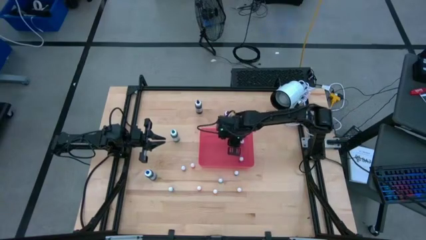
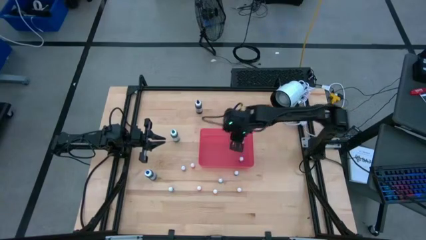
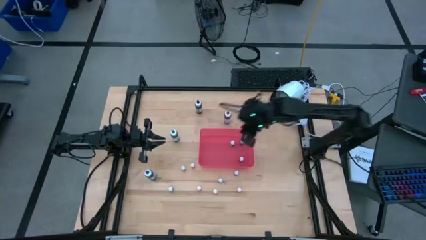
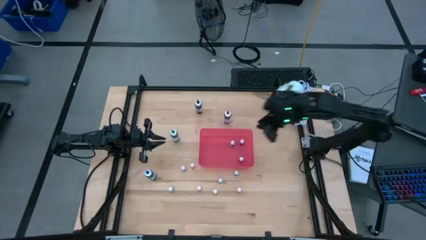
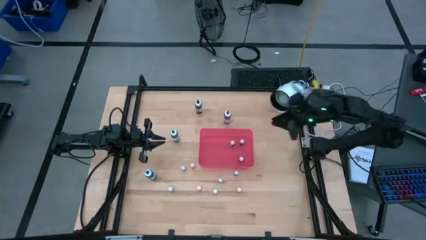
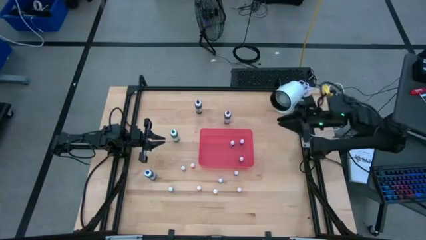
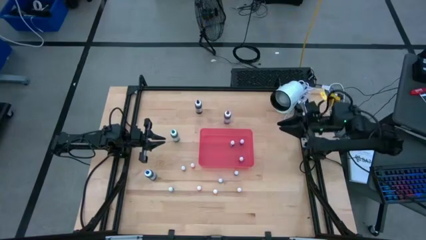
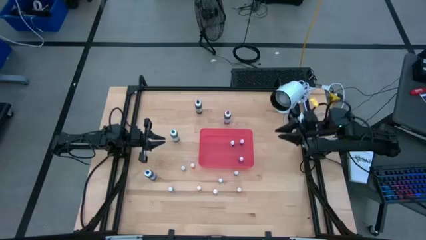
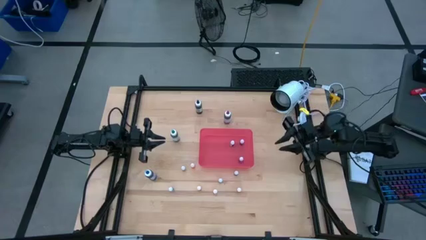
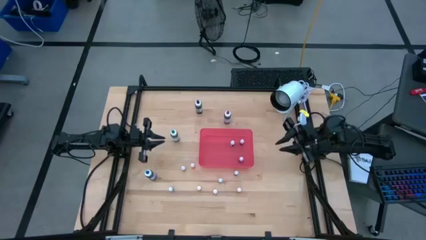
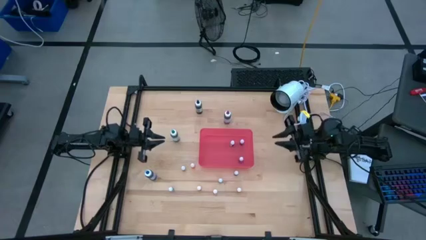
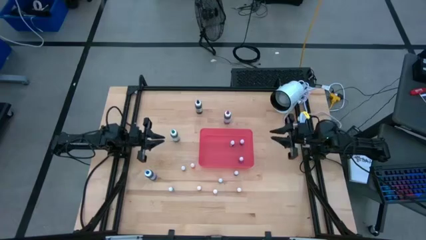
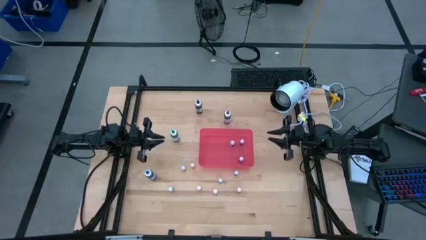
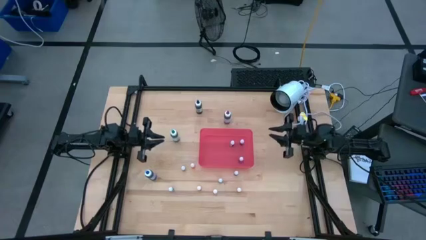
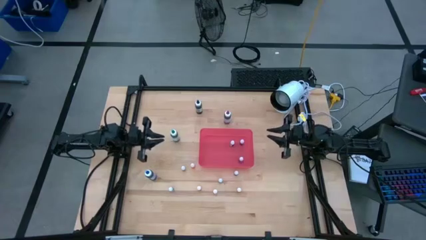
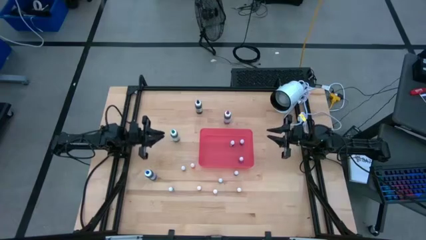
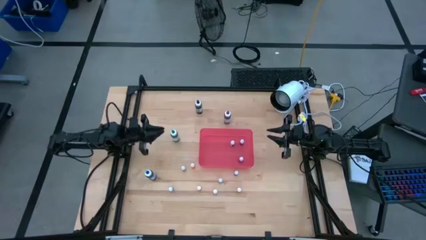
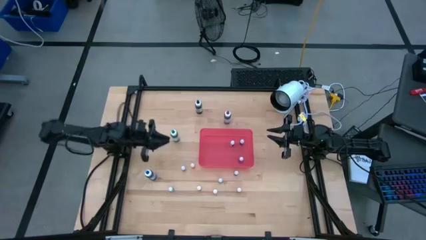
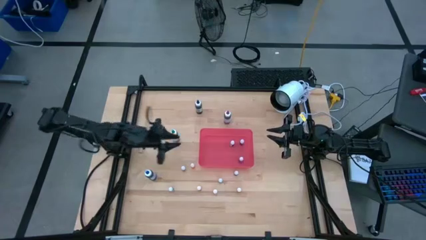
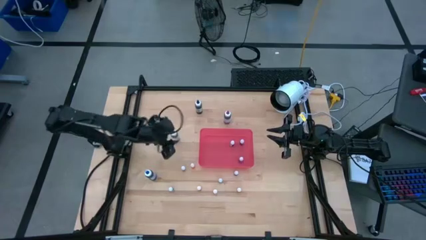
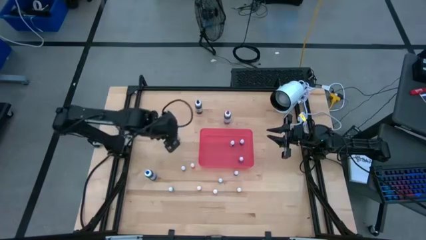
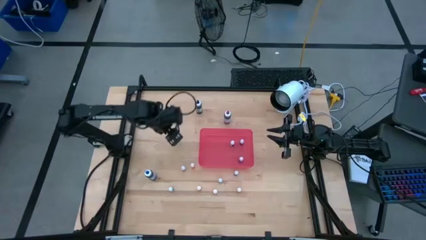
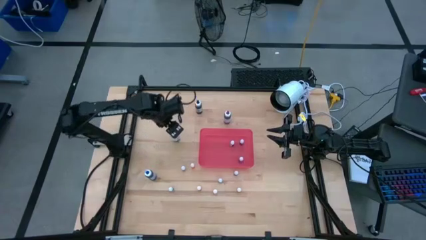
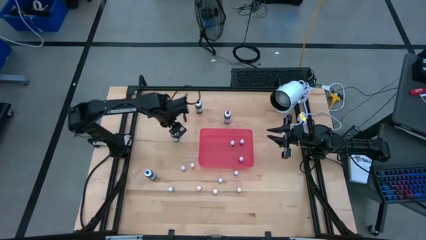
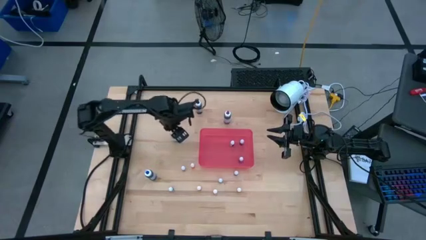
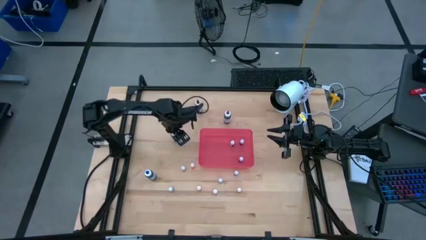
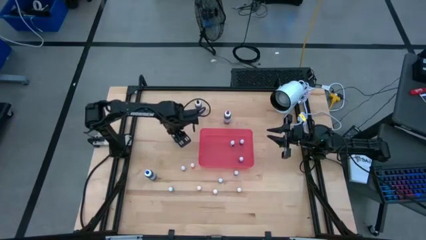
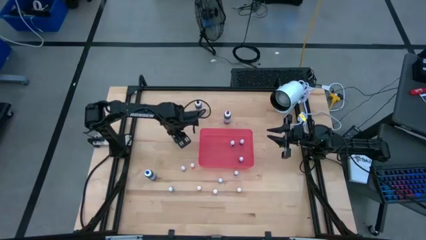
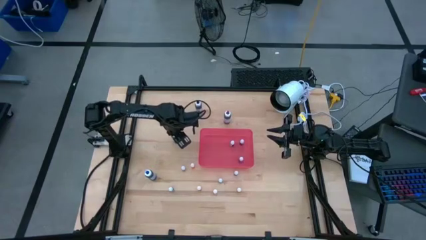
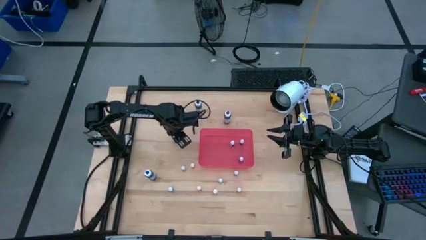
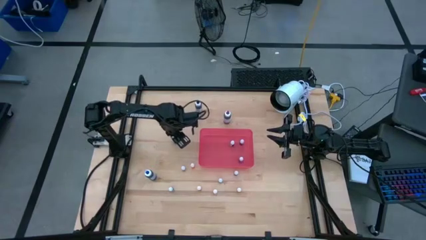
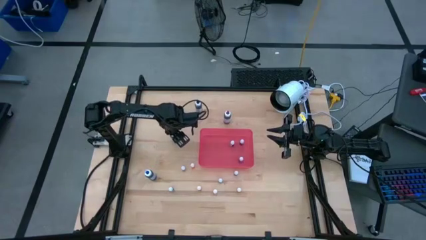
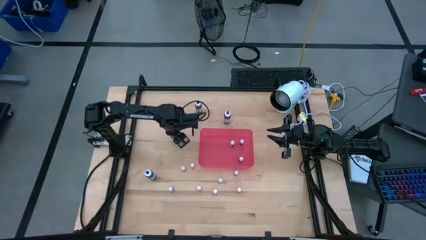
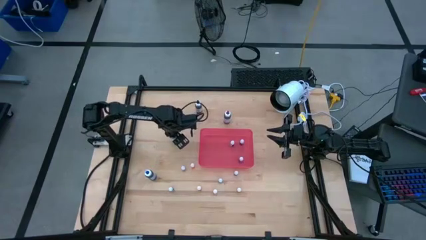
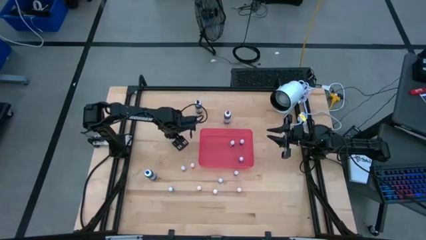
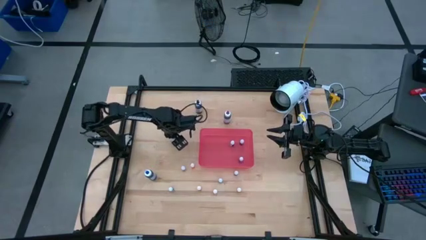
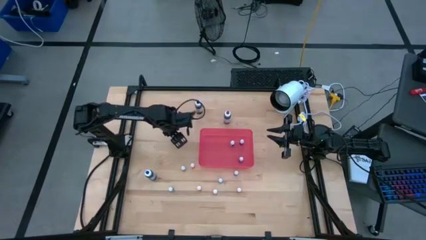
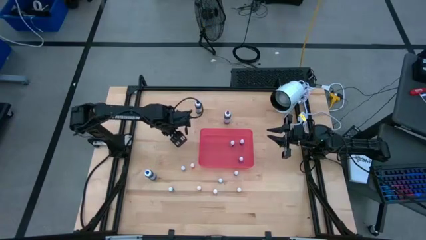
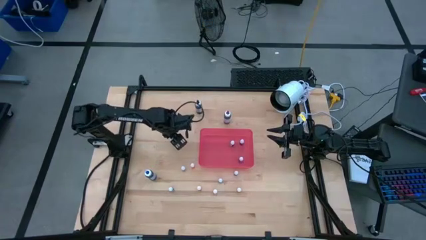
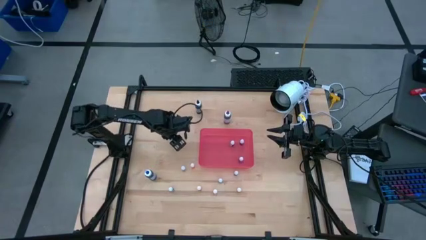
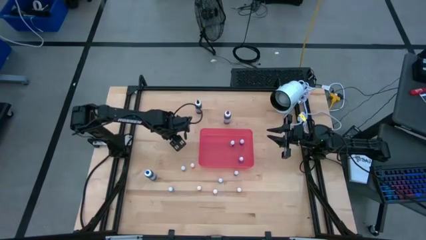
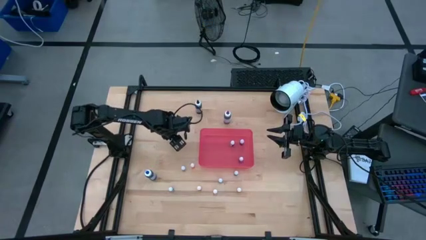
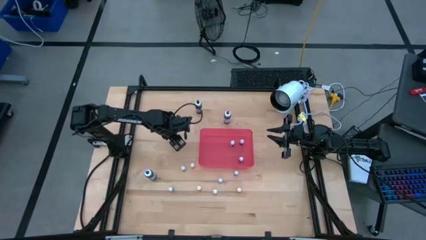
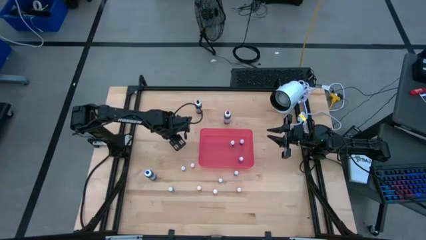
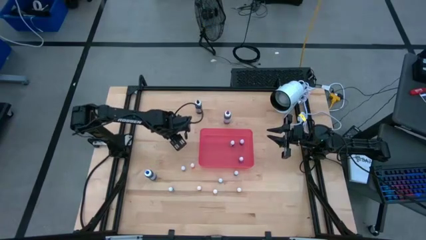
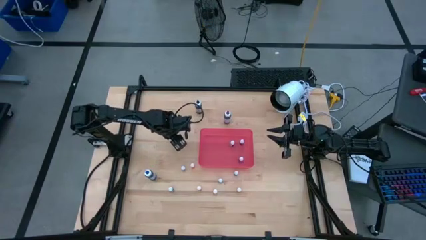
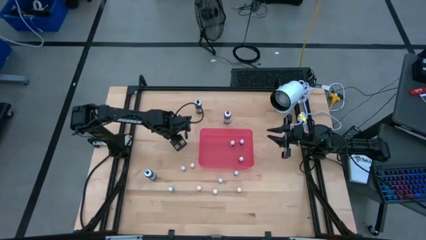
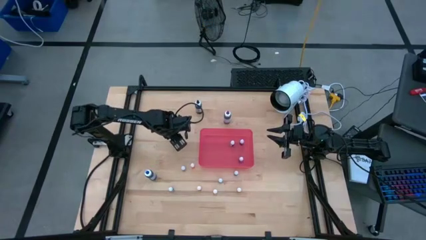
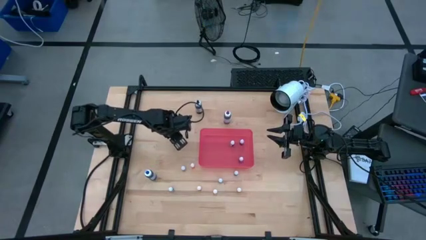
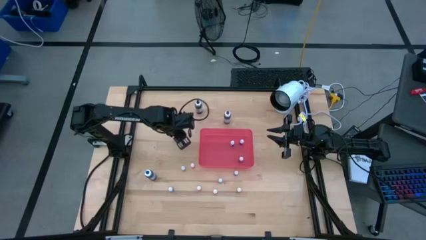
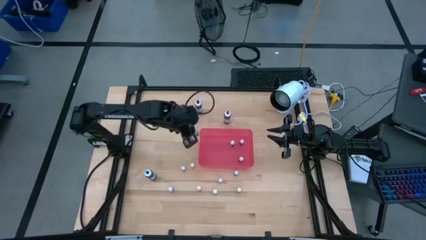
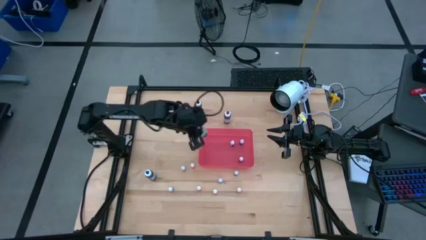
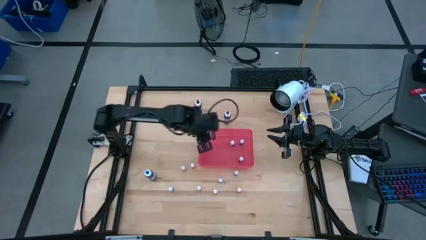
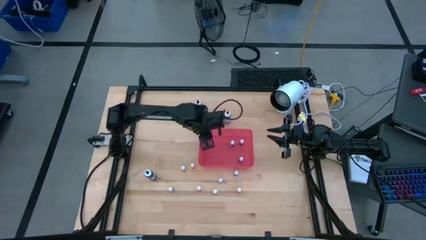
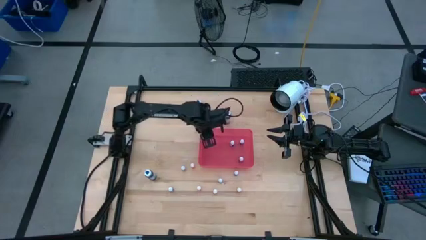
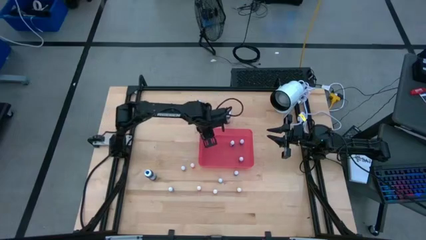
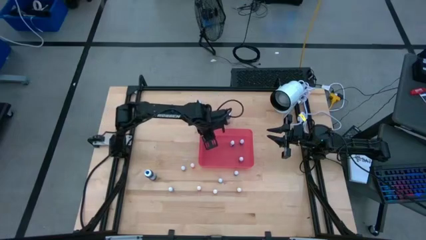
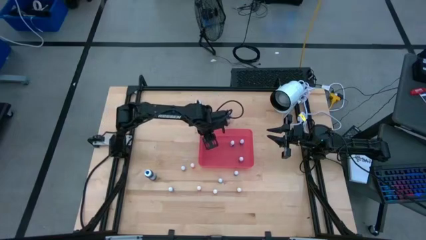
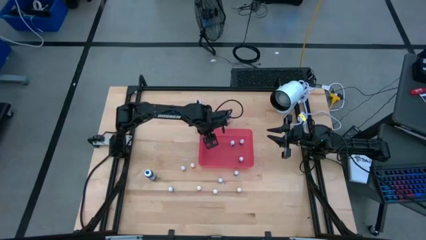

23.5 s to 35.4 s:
Task: Pick & Place food coloring
Put the big green food coloring bottle into the red bin

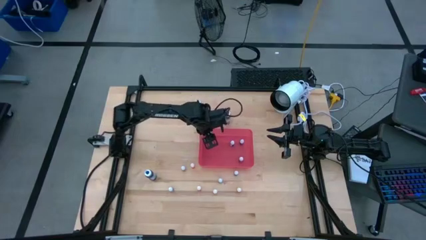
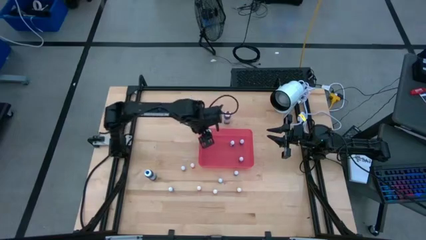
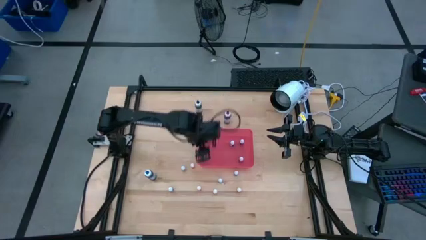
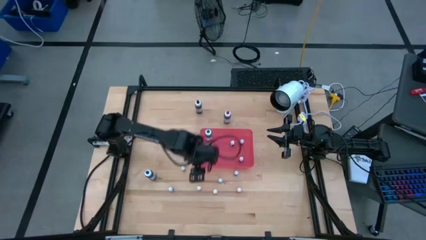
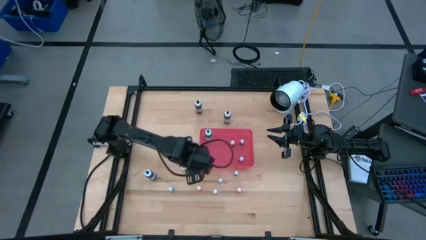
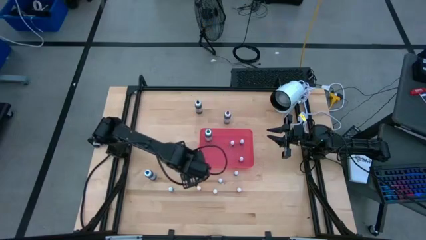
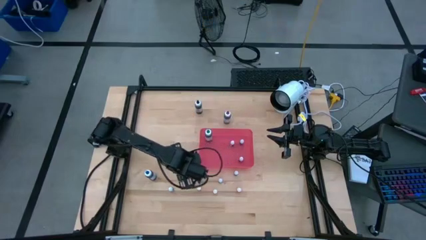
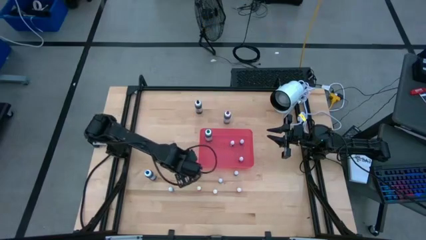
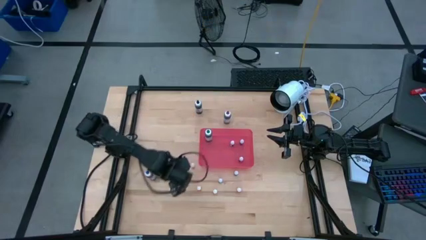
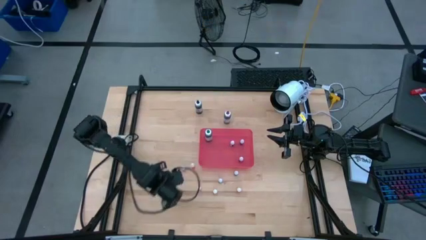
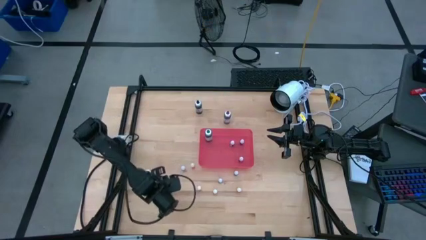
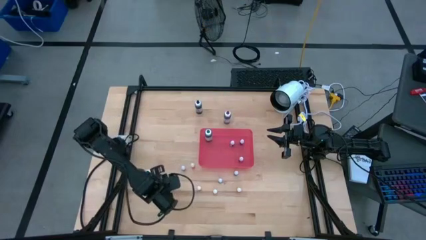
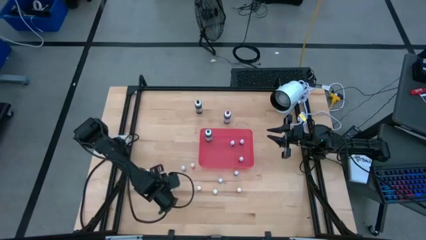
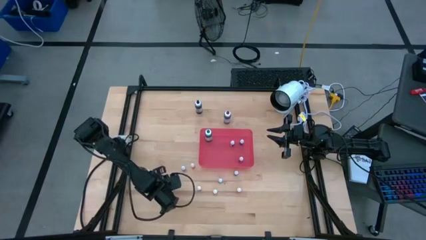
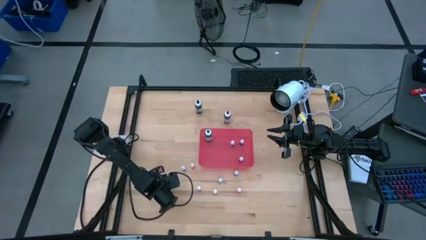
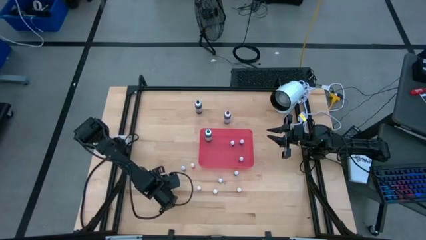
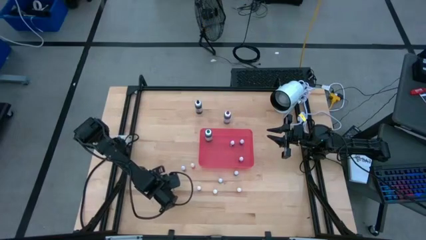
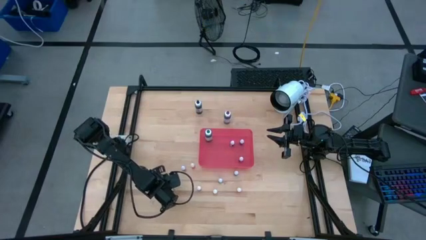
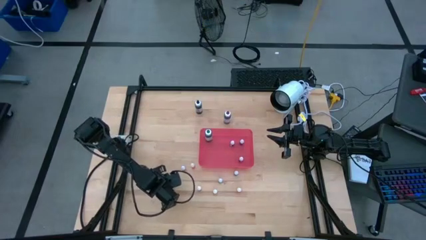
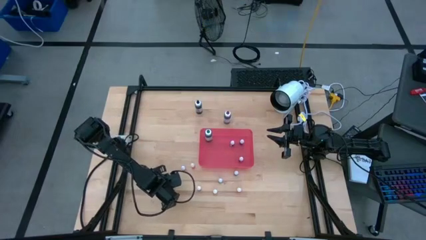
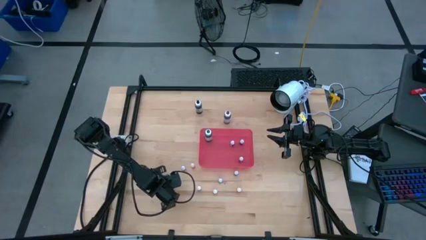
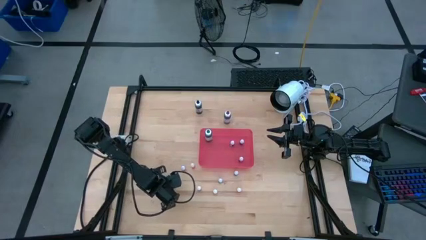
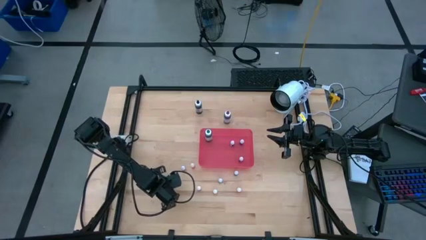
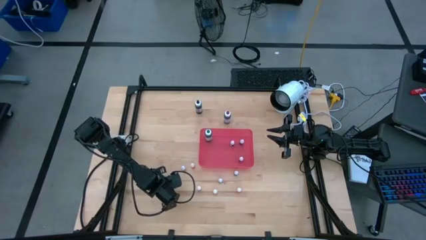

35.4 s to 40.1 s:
Put the small black food coloring bottle into the red bin
